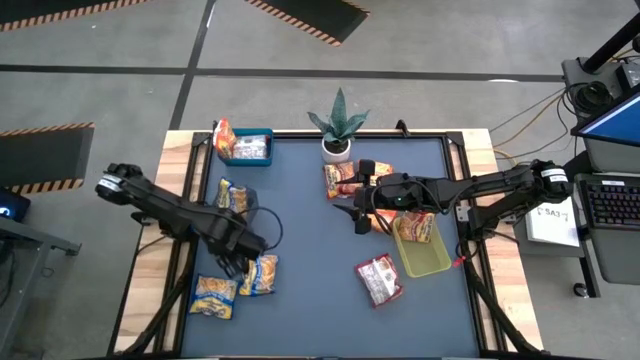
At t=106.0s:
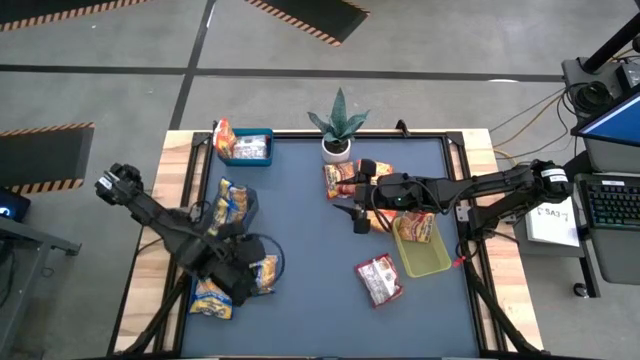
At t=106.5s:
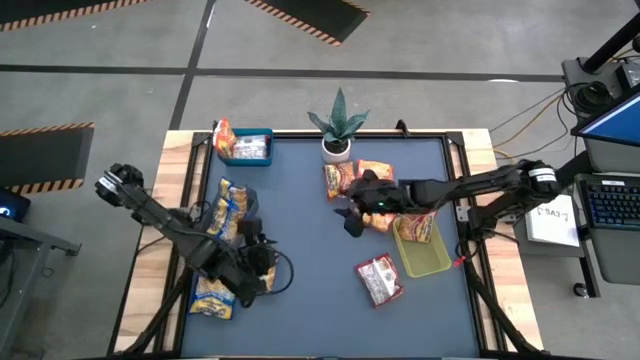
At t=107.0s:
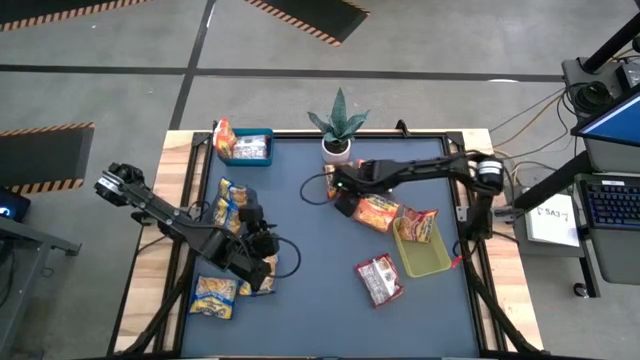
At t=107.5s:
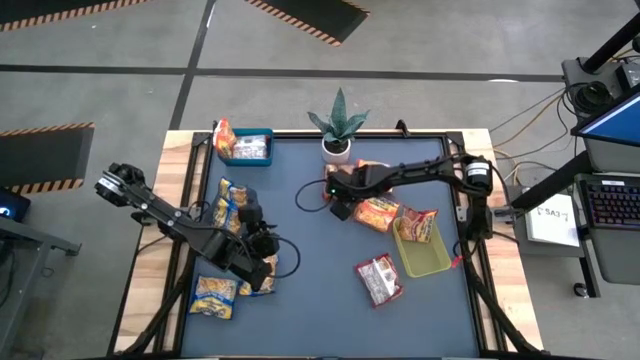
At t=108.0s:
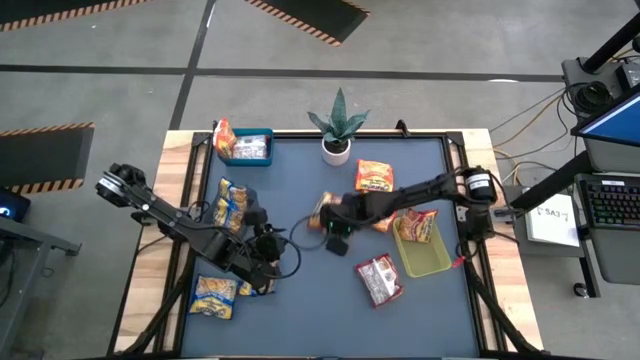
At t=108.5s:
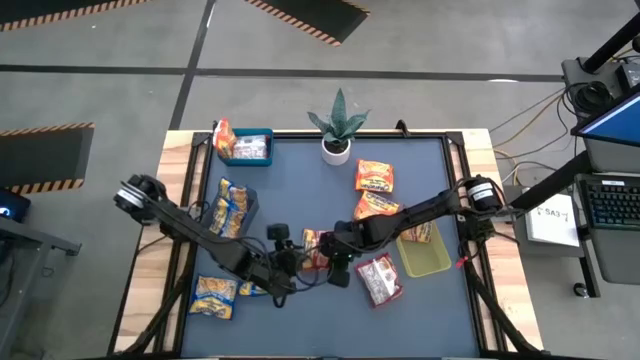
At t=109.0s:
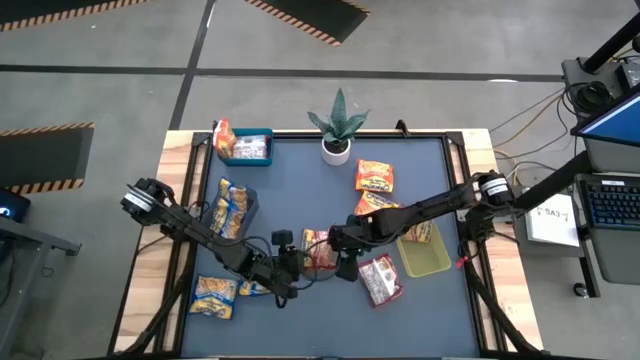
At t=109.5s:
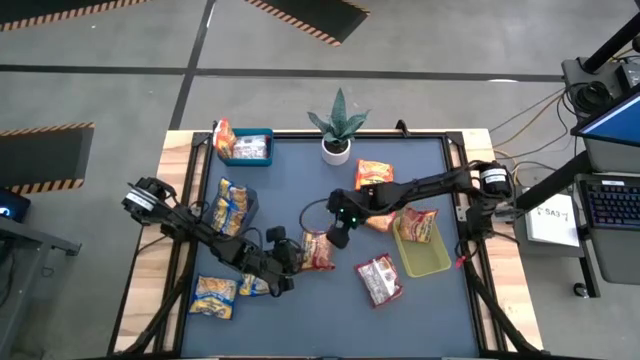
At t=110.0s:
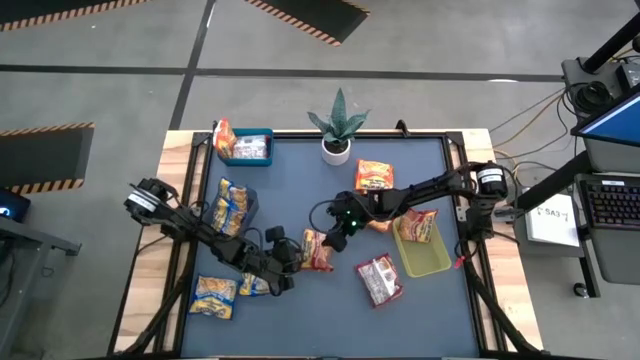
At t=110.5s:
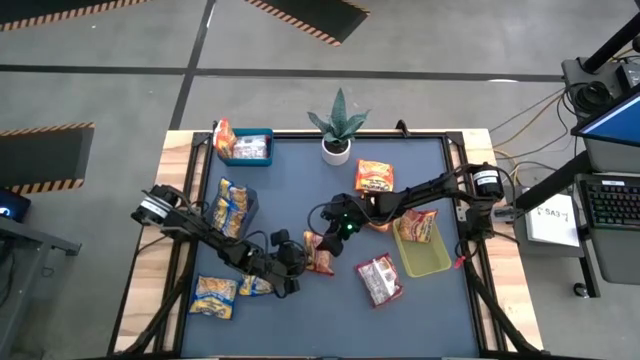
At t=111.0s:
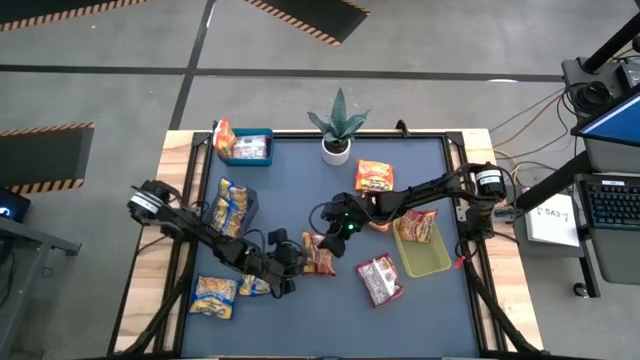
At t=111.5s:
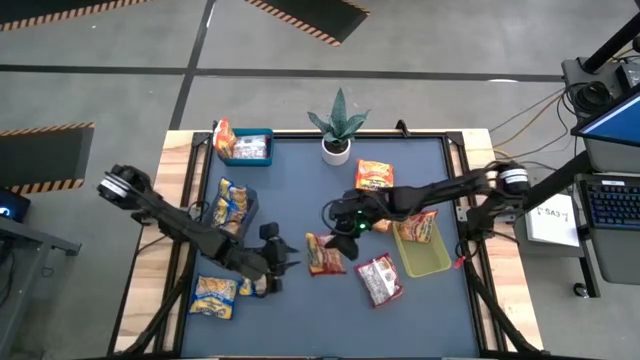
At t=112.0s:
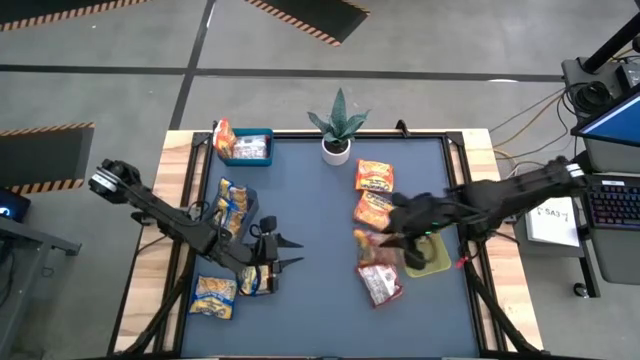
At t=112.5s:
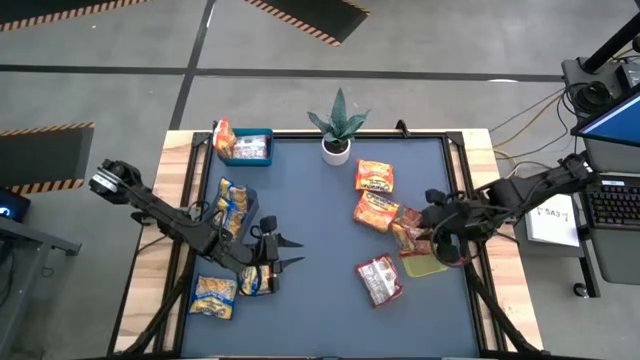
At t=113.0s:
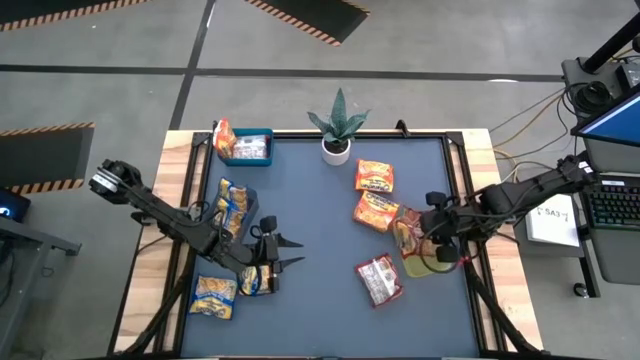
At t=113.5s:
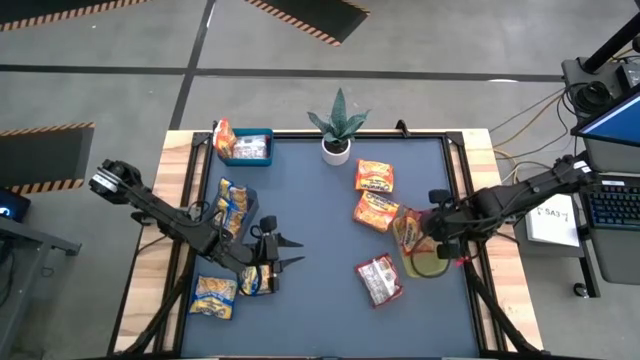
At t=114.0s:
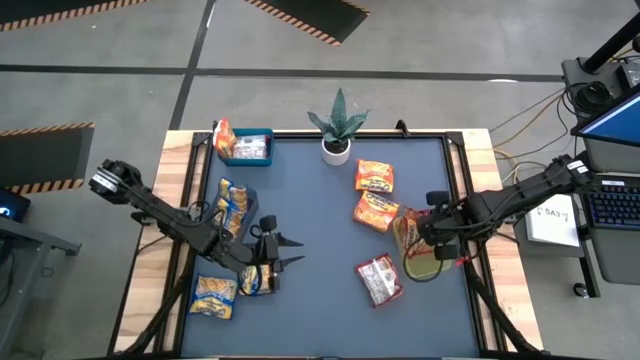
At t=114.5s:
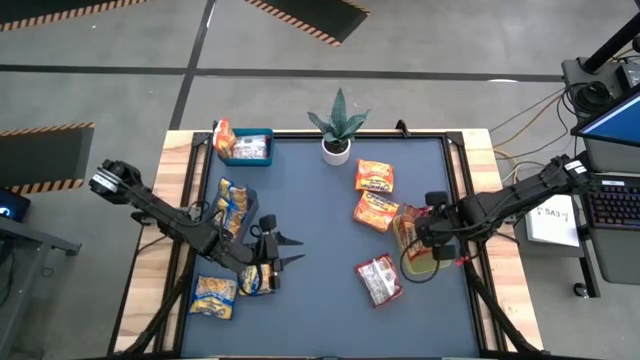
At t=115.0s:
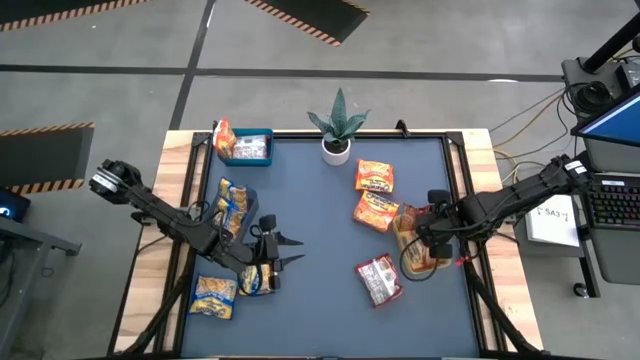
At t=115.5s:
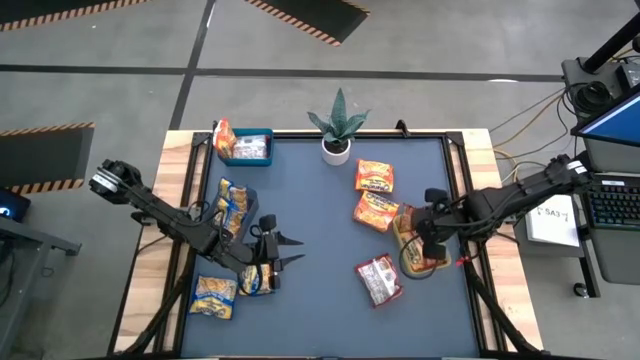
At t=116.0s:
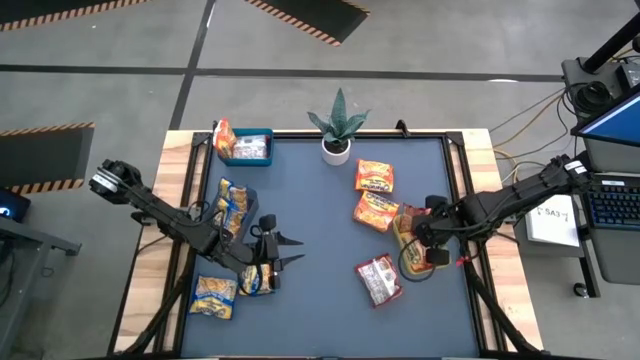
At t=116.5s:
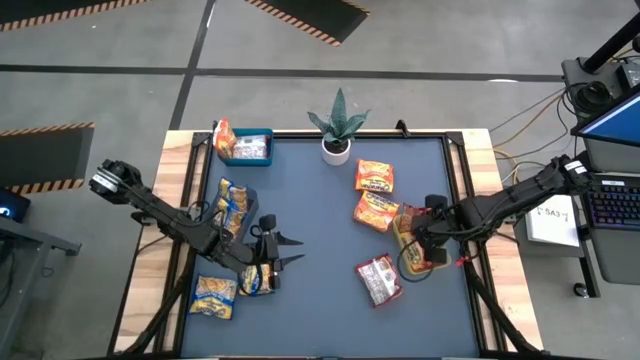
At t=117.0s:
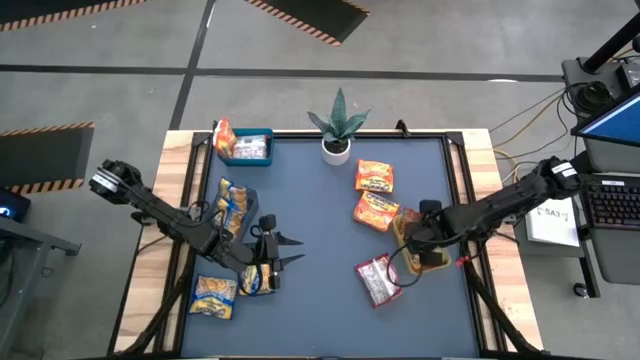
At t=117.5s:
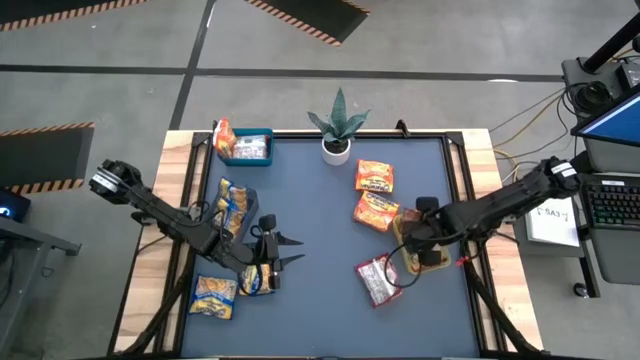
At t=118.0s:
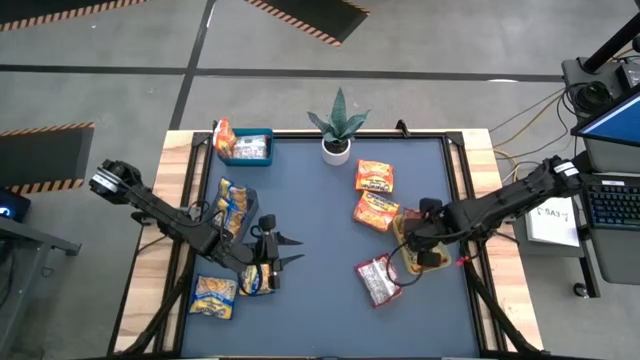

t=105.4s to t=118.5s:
Task: Sort Maruchan noodles
Put the red noodle pack into the yellow bin

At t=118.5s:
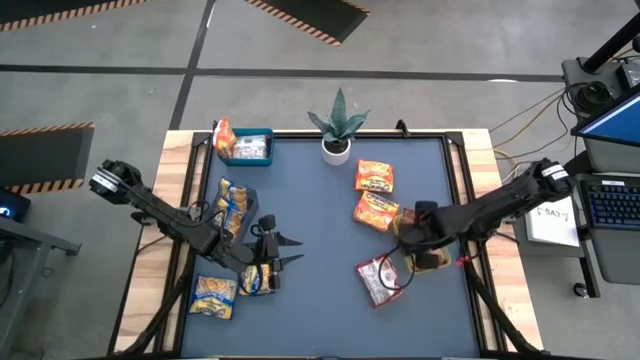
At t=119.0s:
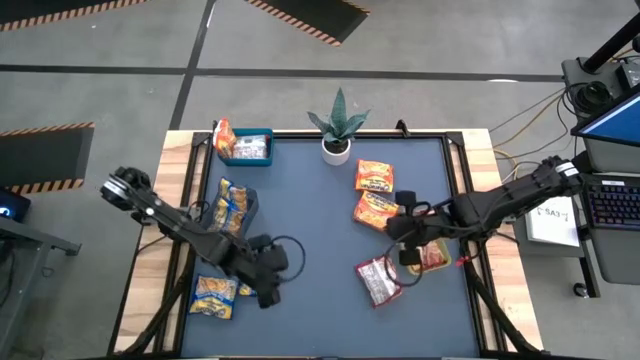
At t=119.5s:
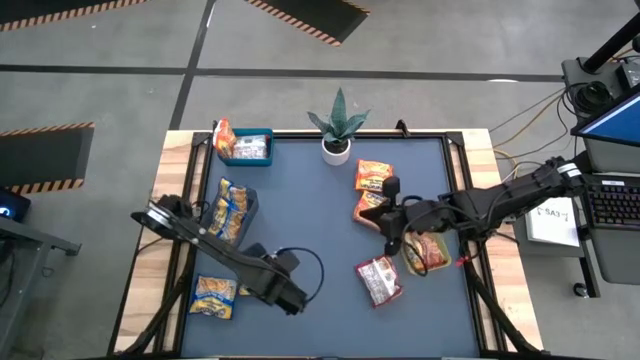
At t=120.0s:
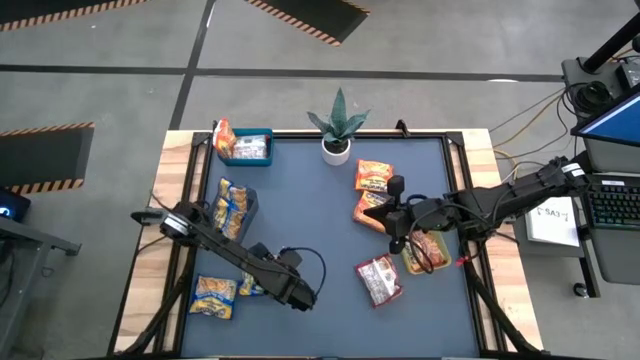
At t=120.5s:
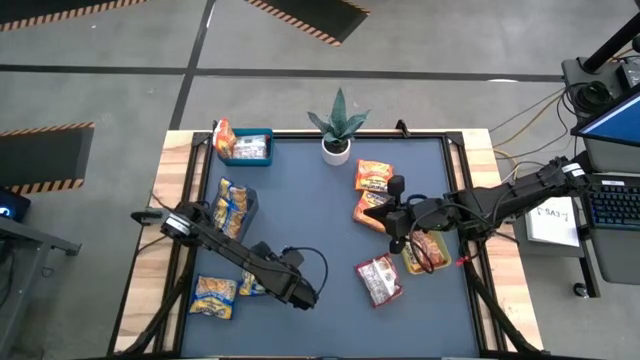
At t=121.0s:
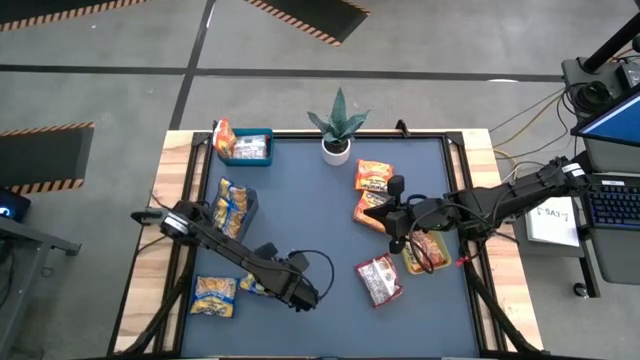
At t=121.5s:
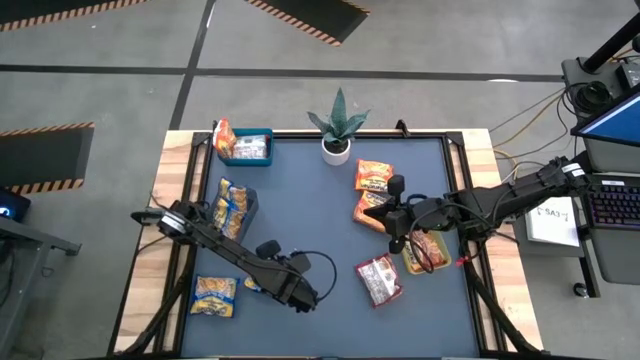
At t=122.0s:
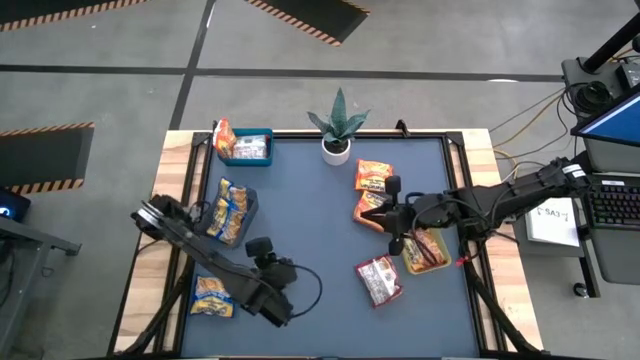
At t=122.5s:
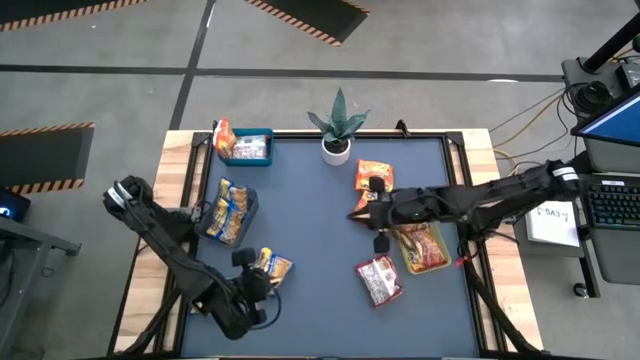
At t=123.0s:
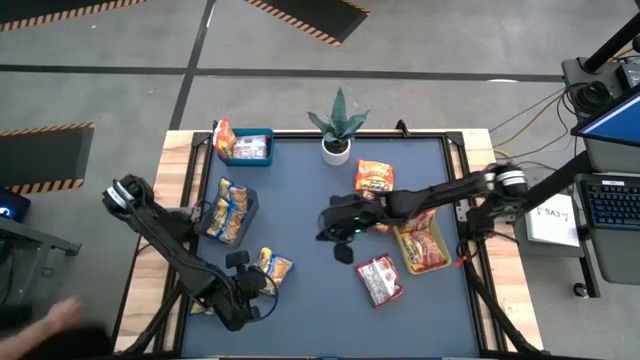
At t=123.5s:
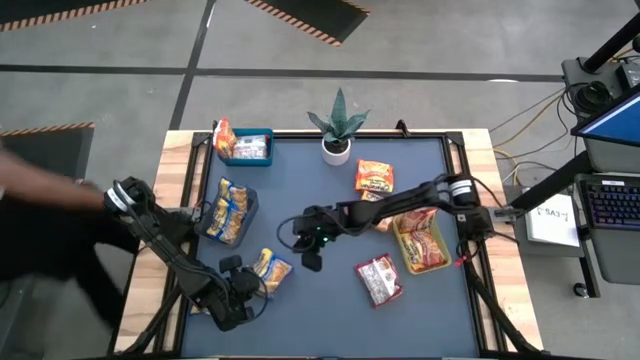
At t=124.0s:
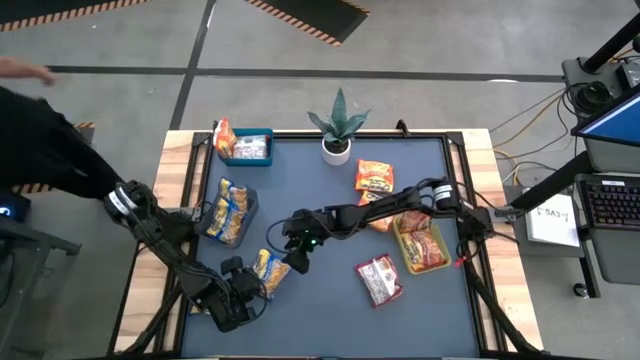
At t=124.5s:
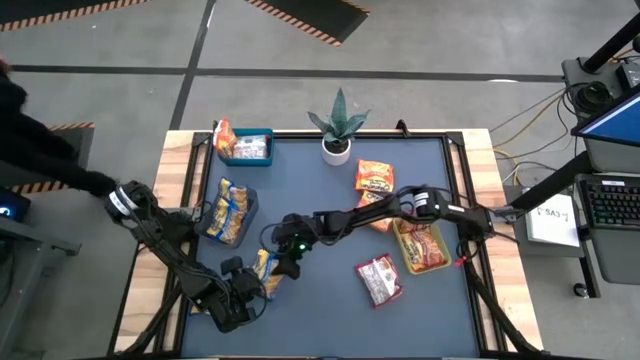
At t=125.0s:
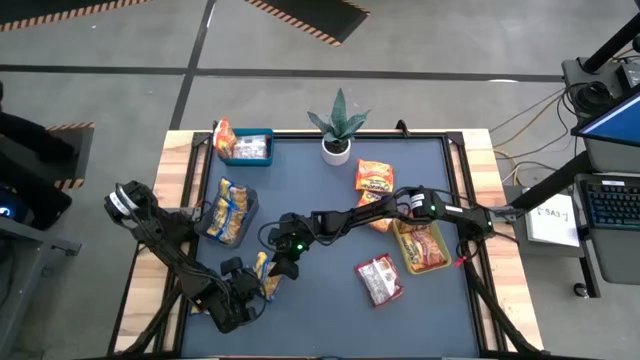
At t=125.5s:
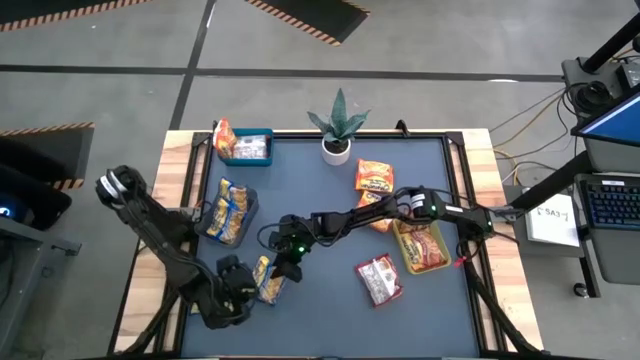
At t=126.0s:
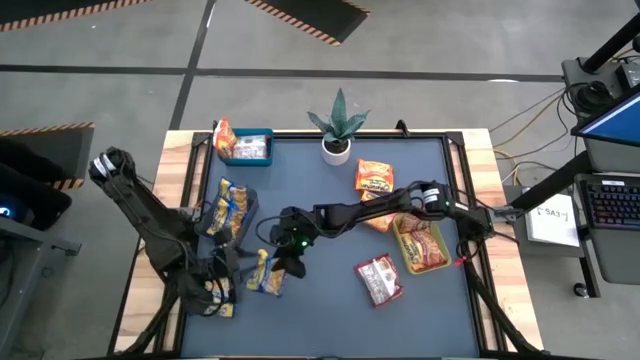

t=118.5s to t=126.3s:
Put the blue noodle pack into the black bin

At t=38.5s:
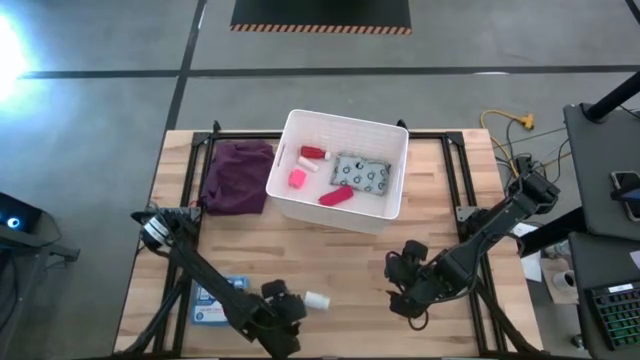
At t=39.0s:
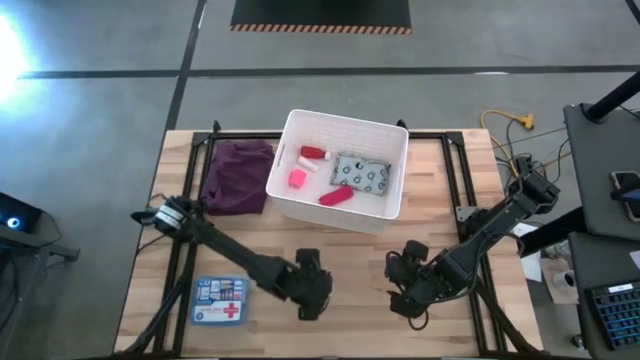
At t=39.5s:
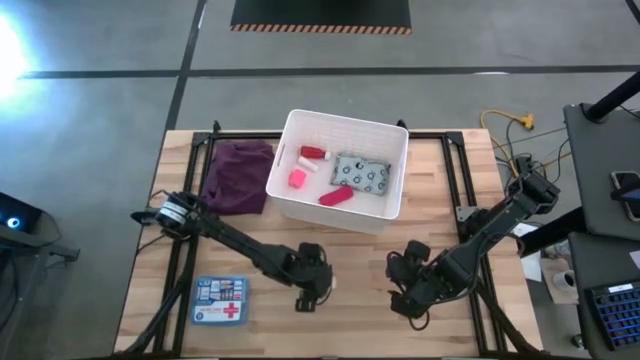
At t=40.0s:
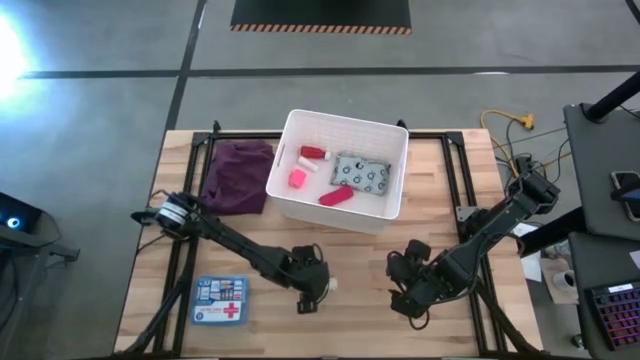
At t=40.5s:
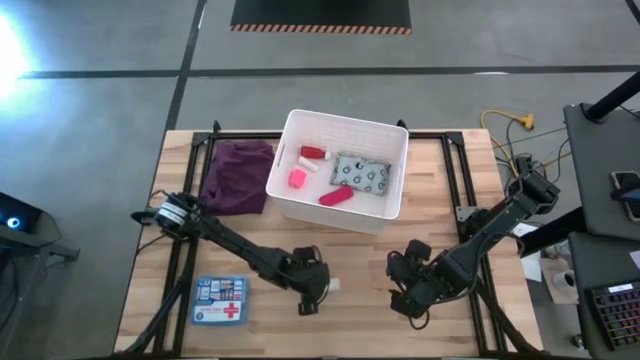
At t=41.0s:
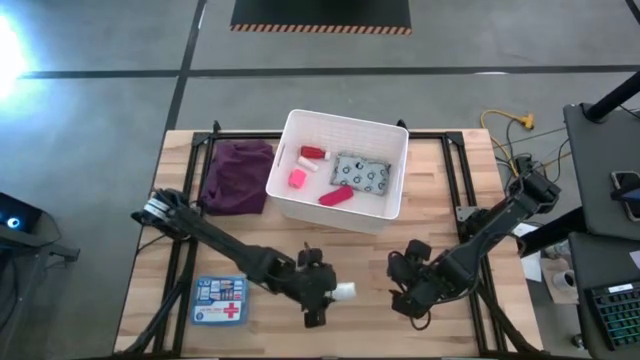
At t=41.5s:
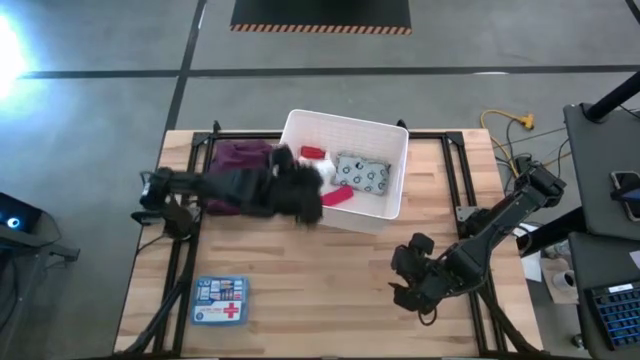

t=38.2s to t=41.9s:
Task: Pick & place medical supplies in basket/bin
Put the white pill bottle into the white bin
